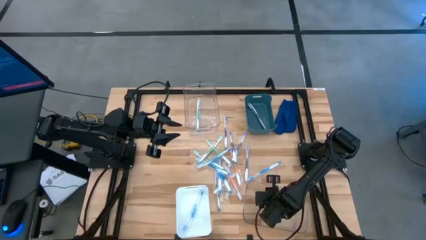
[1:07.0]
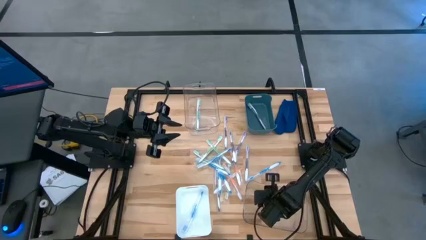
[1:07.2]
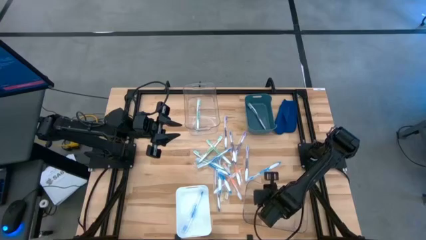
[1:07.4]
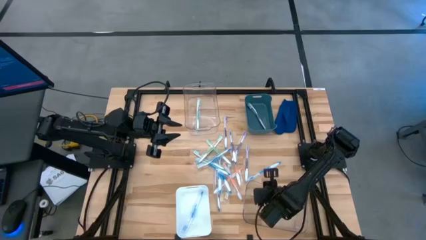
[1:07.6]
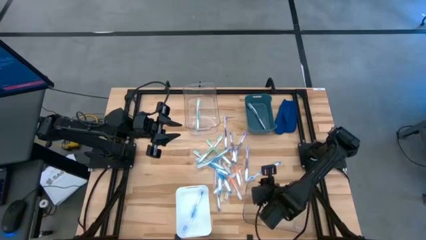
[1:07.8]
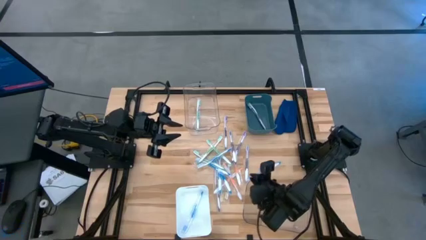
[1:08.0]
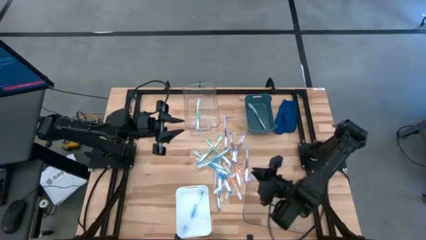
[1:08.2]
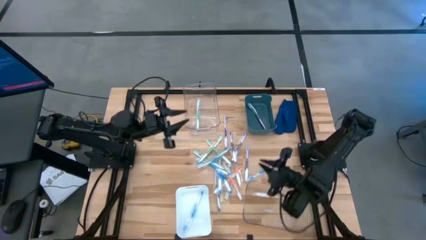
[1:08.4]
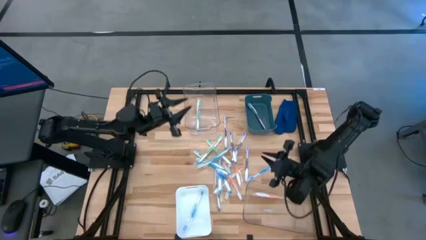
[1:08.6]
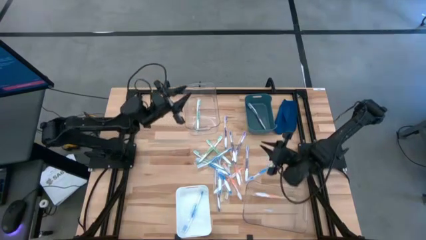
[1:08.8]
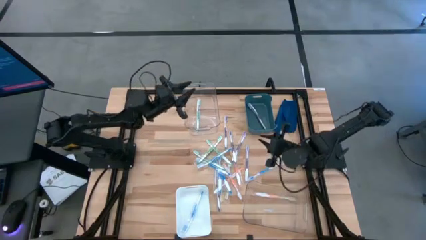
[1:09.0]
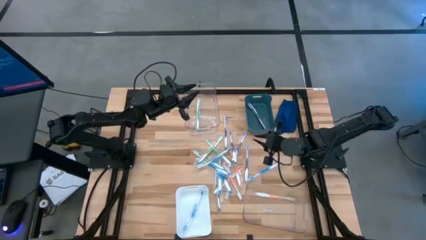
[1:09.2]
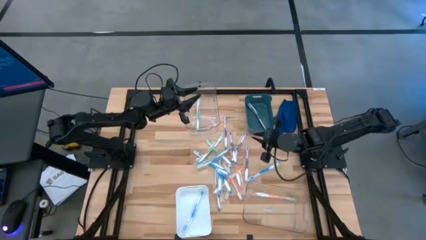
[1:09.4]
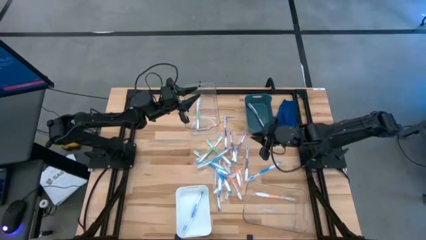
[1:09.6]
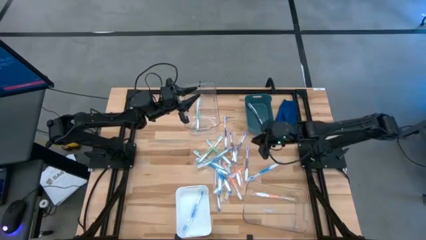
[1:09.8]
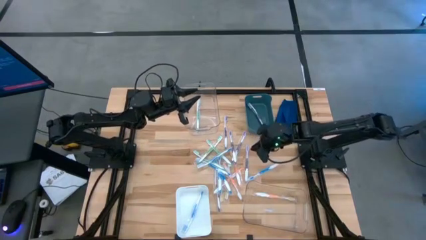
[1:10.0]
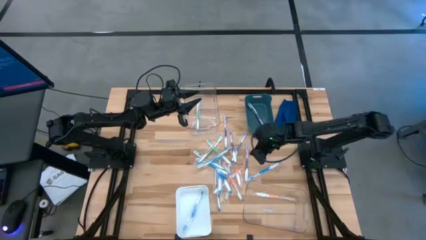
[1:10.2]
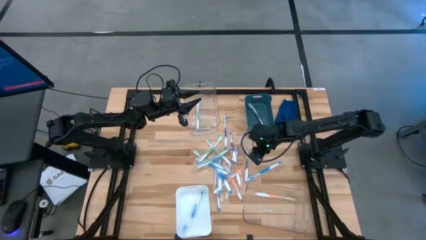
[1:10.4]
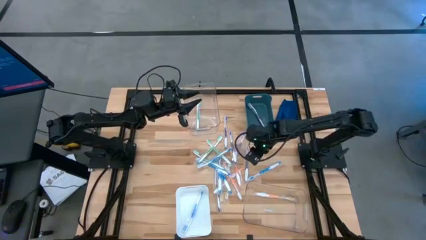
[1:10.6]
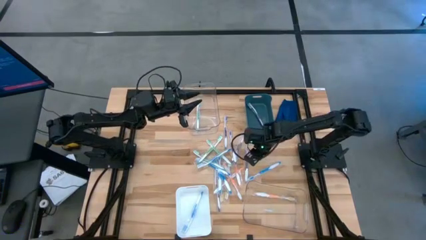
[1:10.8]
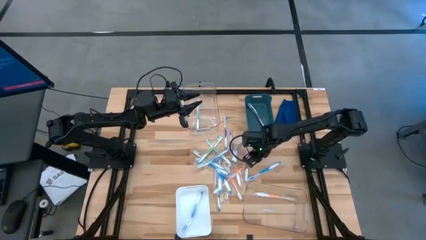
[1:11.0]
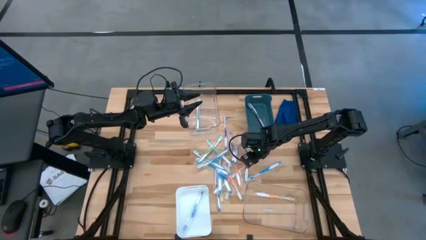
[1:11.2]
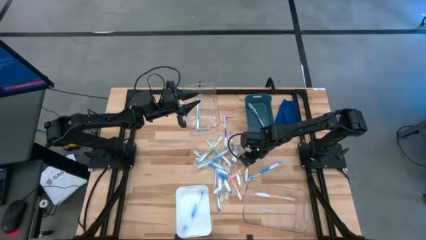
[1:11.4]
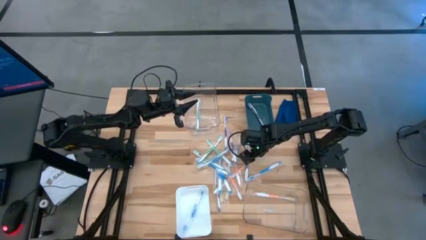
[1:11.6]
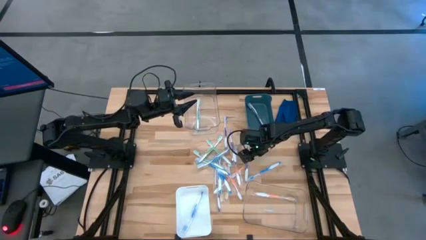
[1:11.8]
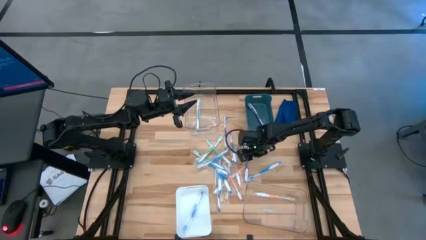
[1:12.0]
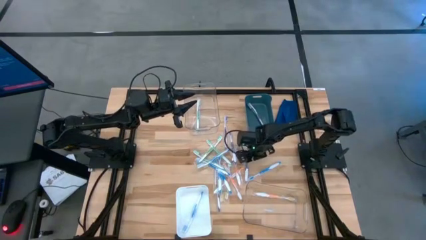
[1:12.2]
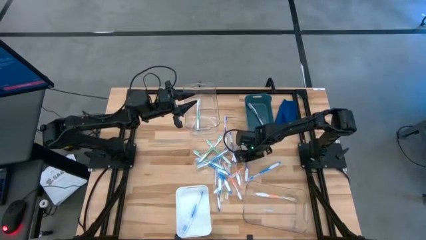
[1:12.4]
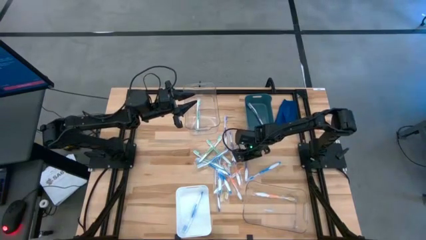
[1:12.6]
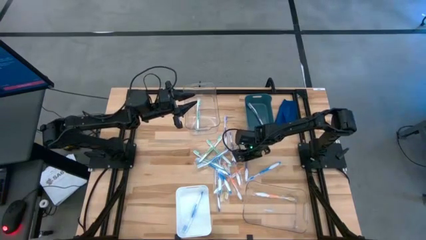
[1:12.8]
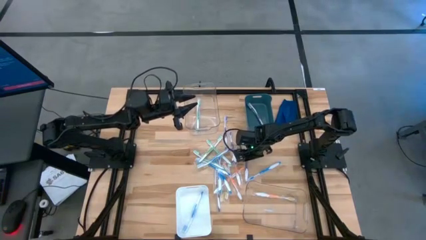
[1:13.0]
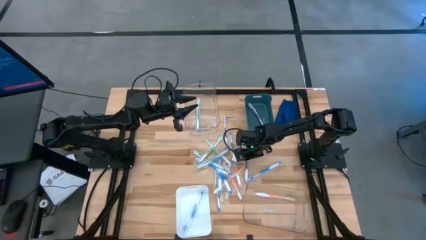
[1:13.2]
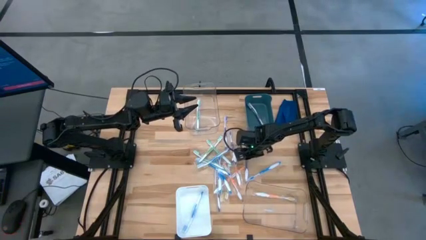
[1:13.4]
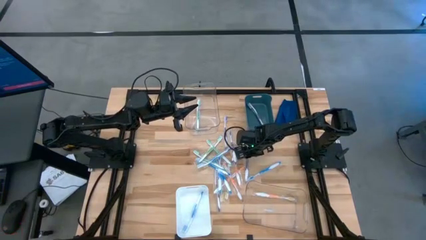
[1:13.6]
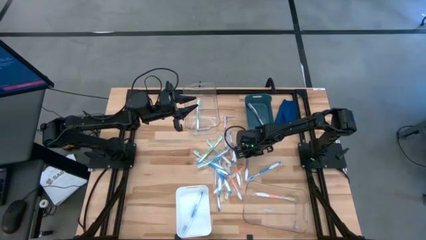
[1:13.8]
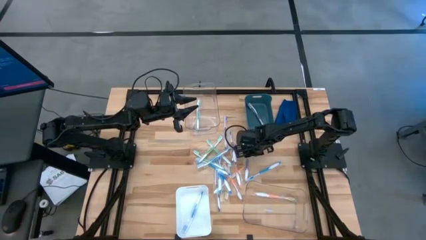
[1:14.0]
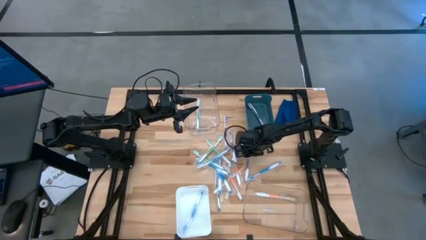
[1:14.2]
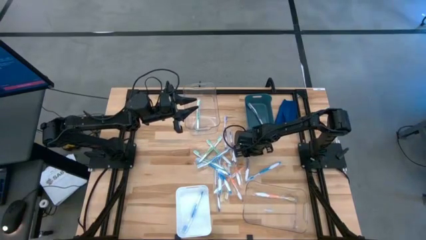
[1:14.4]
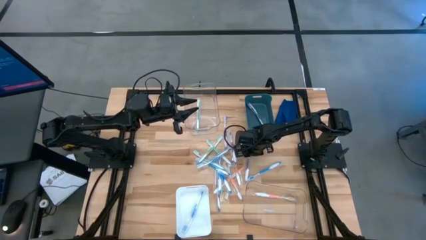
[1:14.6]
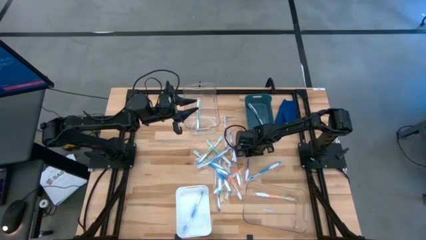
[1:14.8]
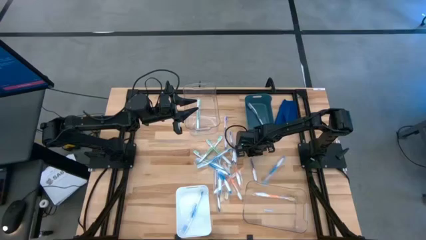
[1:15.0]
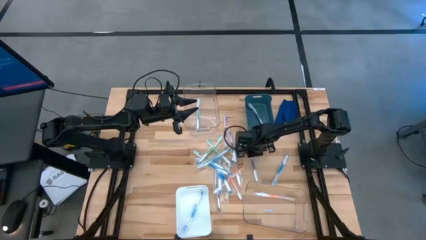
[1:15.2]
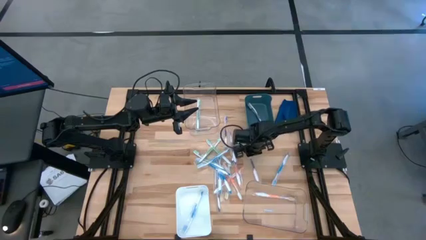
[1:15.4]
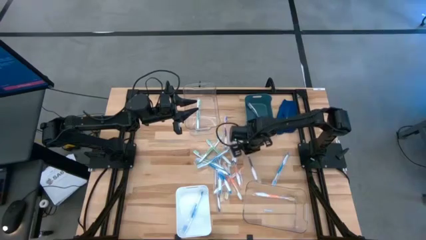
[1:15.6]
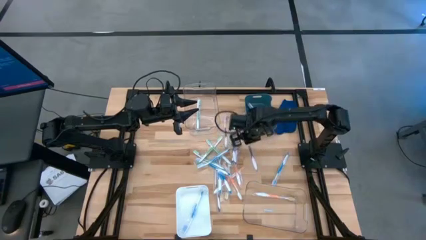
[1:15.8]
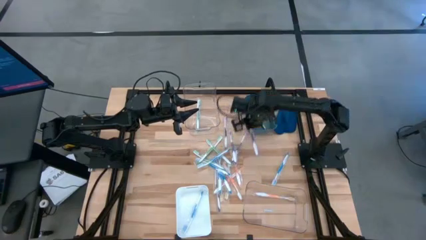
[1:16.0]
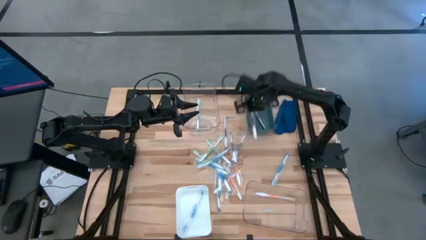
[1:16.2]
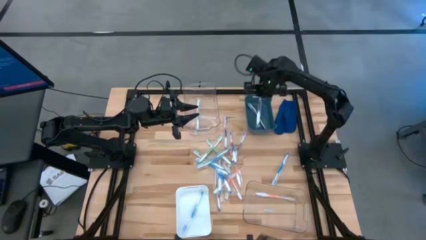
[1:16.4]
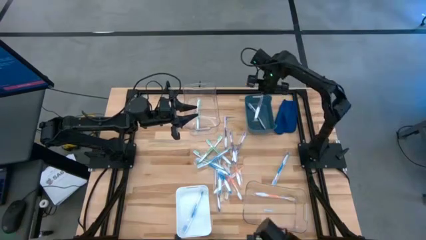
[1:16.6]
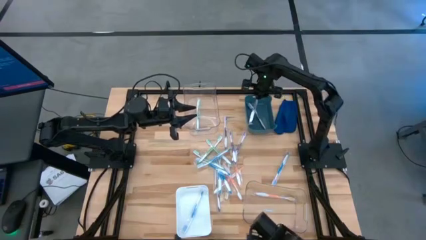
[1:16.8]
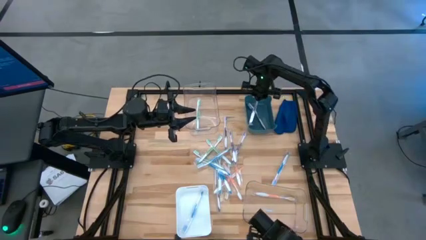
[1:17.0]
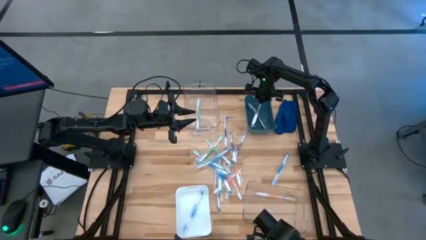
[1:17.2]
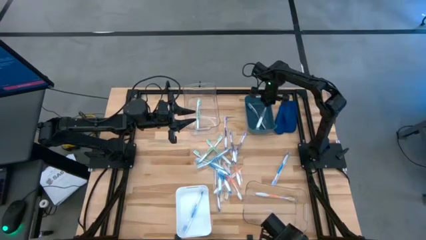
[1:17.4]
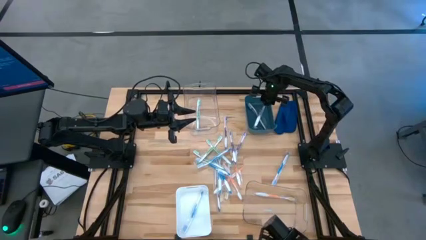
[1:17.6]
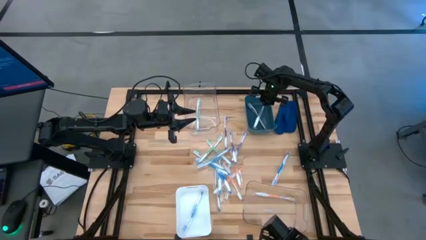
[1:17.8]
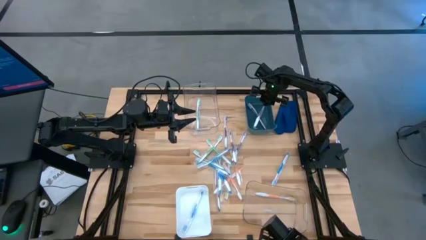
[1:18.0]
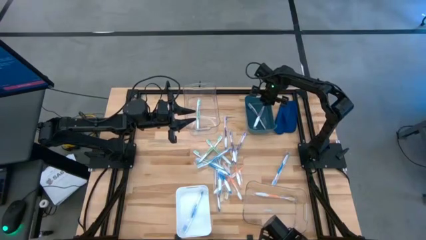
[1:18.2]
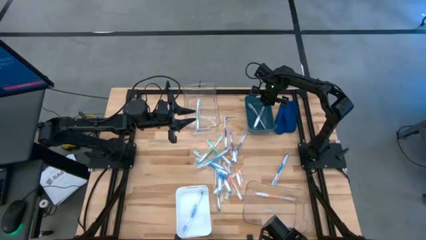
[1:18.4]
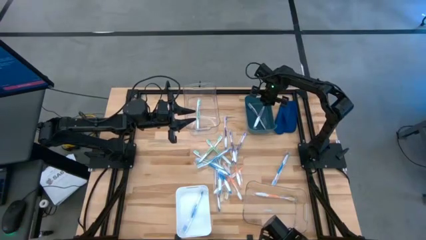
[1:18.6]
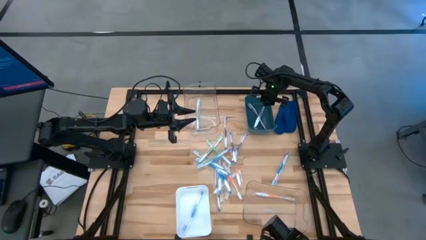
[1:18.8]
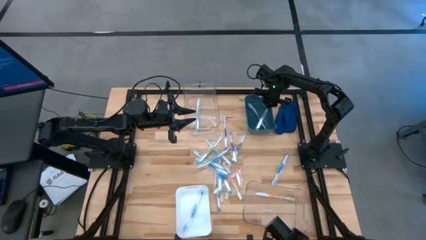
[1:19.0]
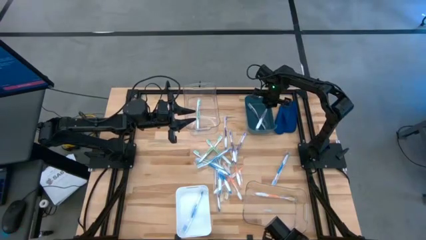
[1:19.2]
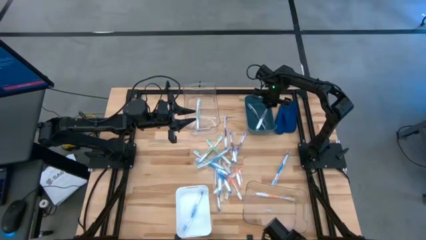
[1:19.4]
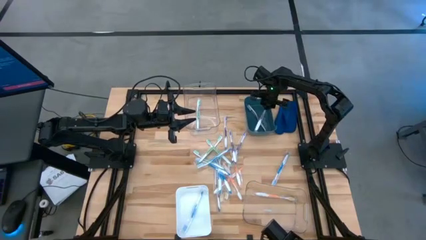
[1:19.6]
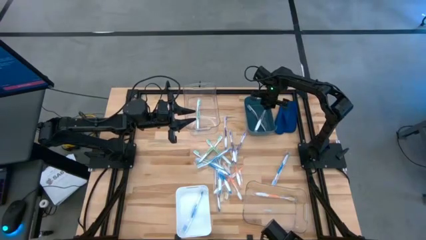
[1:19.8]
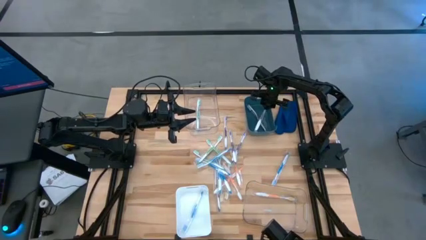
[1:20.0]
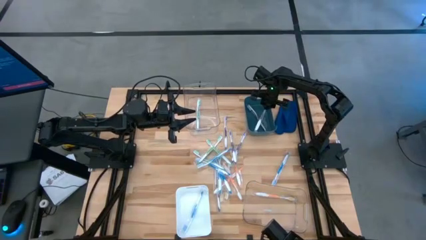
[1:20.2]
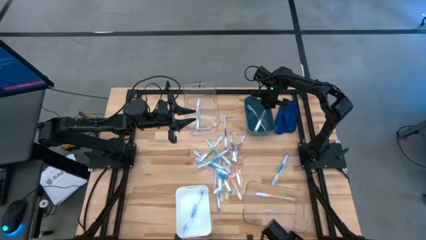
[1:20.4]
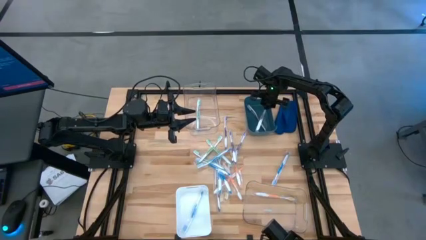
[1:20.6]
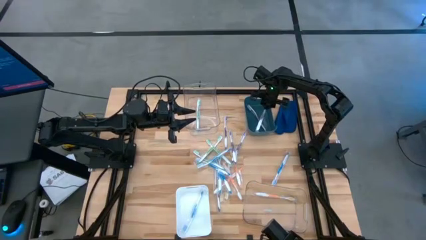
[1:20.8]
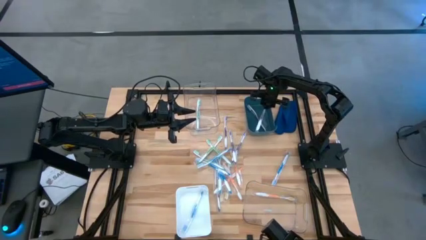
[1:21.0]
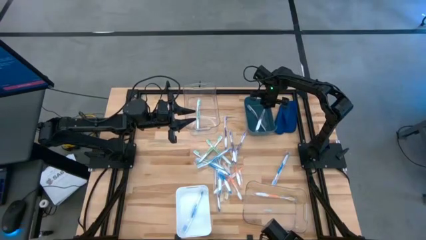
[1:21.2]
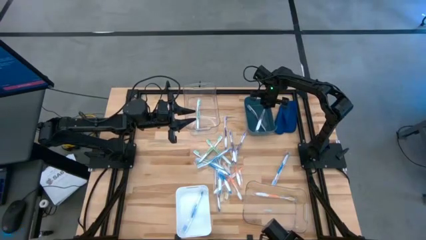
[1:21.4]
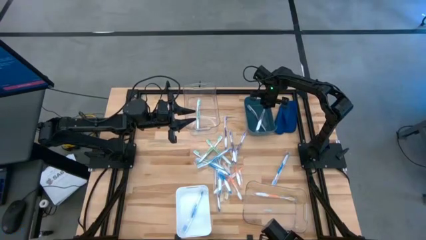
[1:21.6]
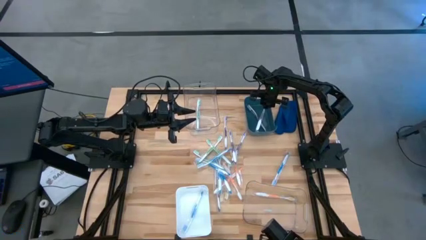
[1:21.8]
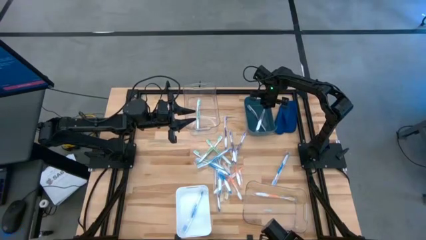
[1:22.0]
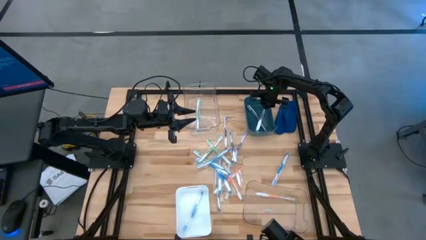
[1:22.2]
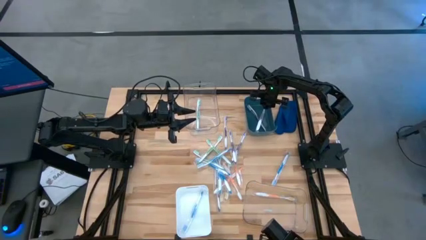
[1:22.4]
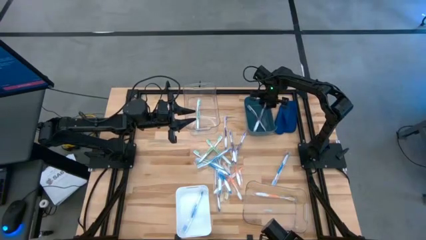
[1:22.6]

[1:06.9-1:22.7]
Task: Pick & Place Toothbrushes
Put the purple toothbrush into the green bin
